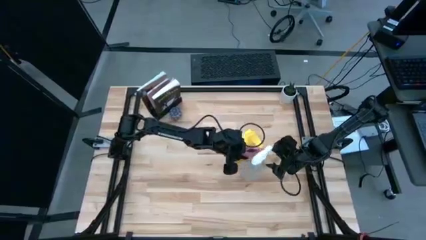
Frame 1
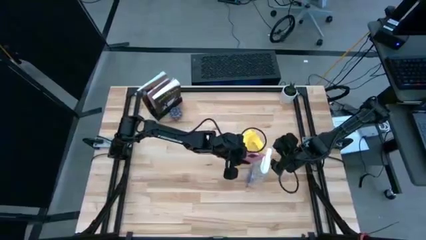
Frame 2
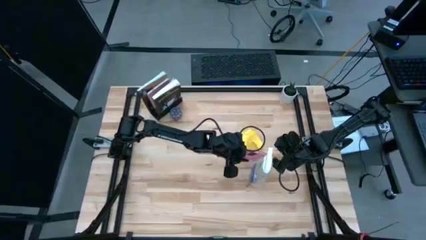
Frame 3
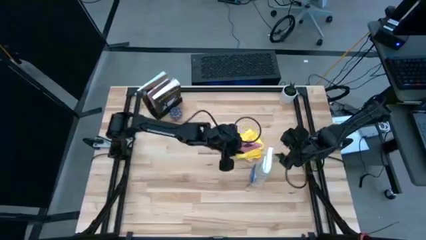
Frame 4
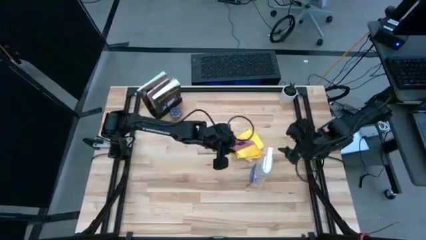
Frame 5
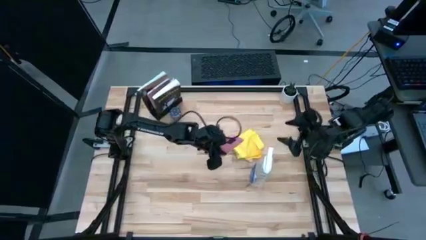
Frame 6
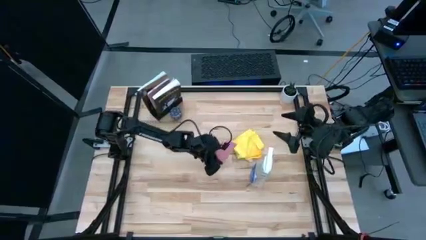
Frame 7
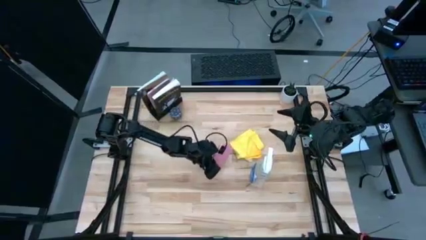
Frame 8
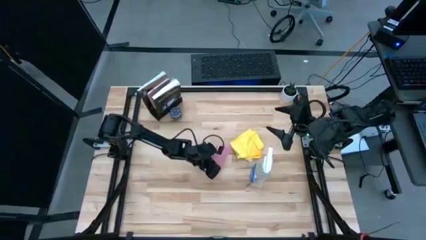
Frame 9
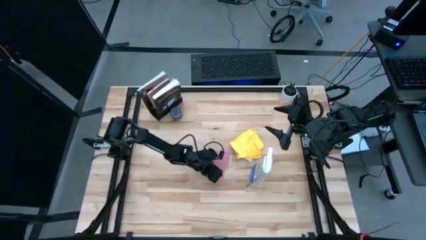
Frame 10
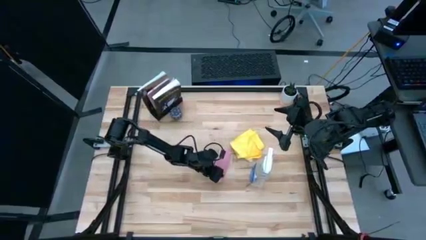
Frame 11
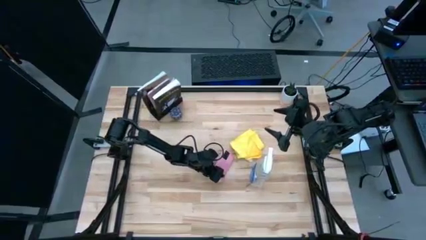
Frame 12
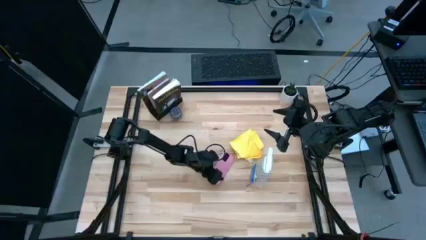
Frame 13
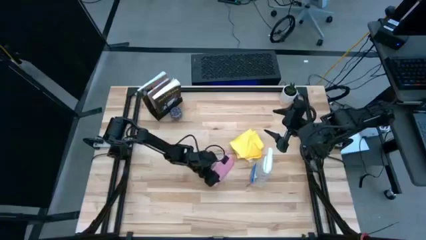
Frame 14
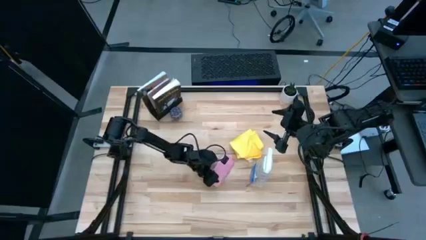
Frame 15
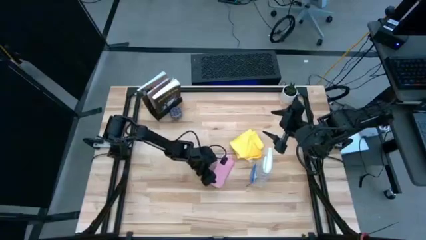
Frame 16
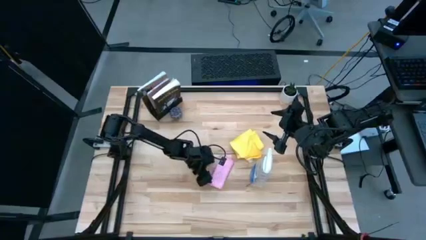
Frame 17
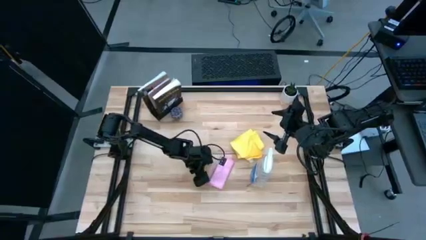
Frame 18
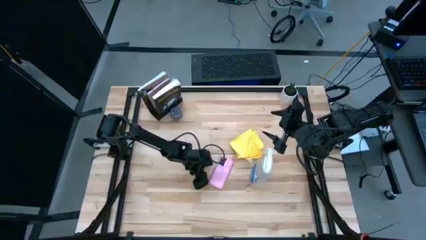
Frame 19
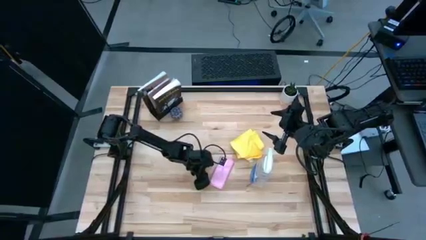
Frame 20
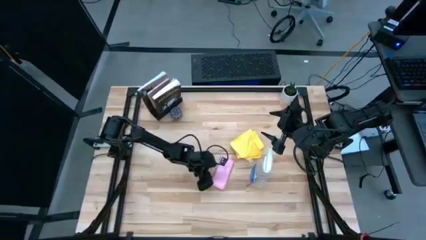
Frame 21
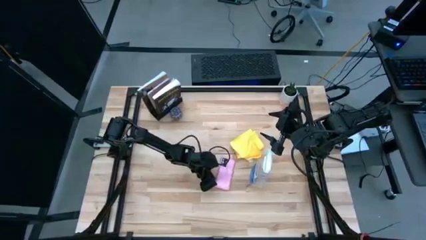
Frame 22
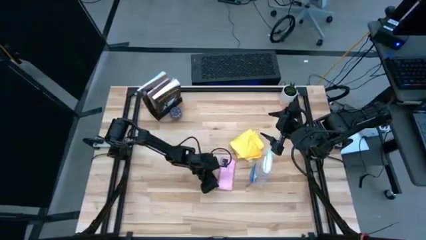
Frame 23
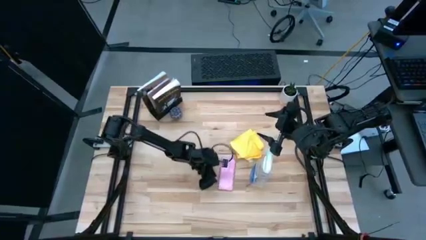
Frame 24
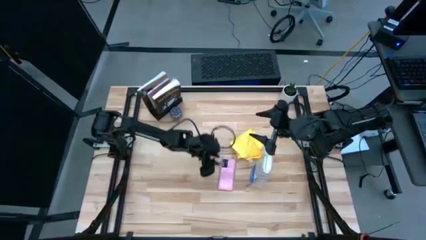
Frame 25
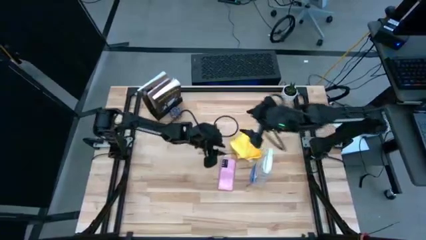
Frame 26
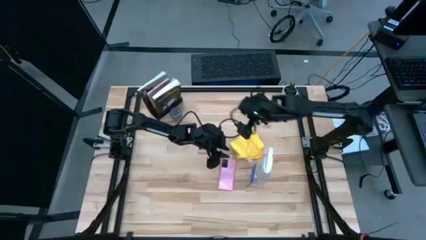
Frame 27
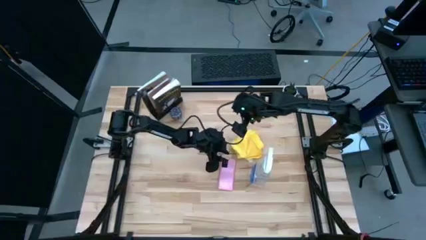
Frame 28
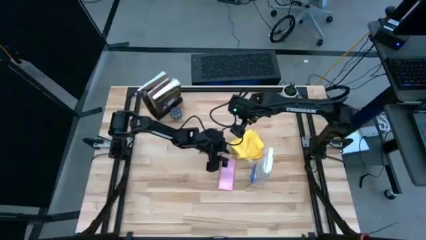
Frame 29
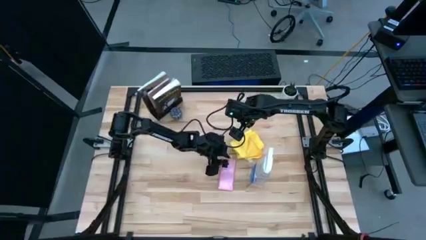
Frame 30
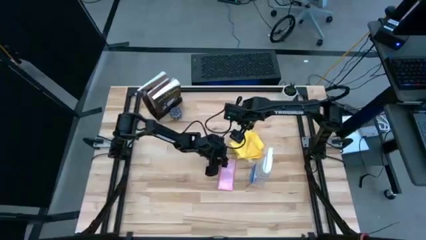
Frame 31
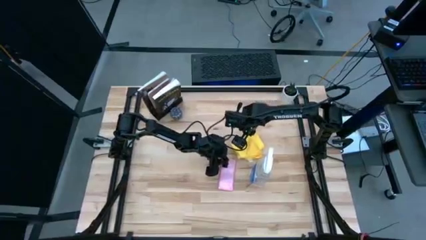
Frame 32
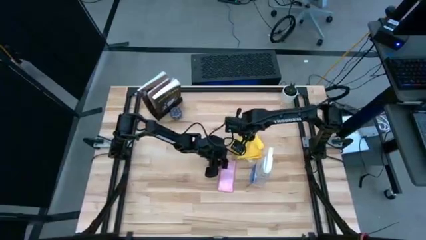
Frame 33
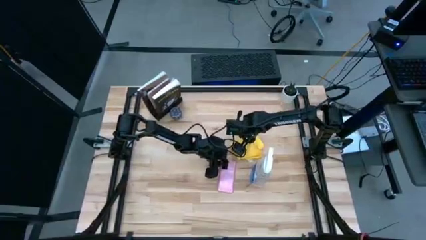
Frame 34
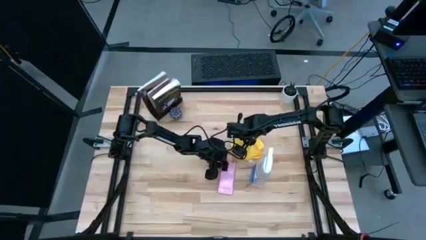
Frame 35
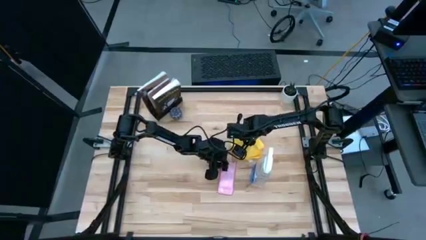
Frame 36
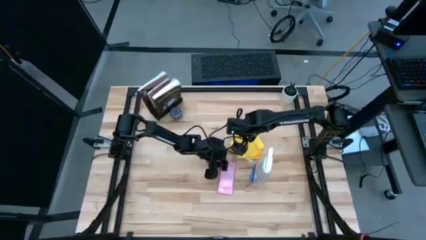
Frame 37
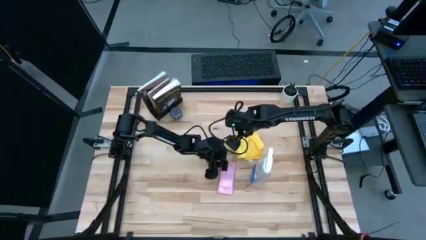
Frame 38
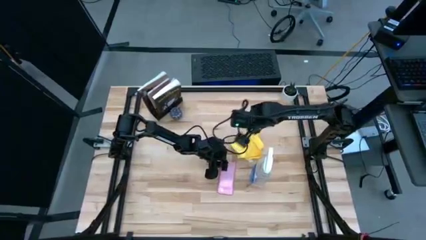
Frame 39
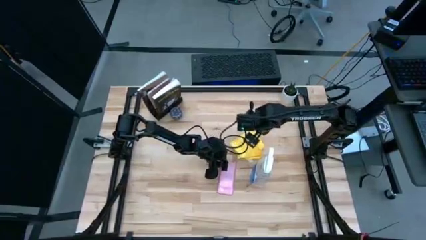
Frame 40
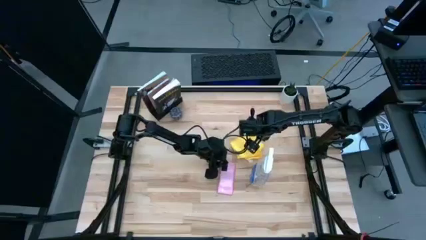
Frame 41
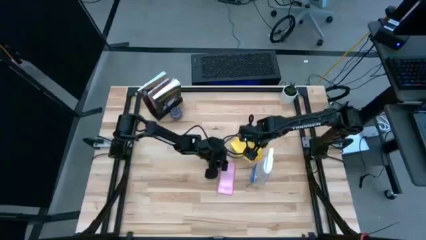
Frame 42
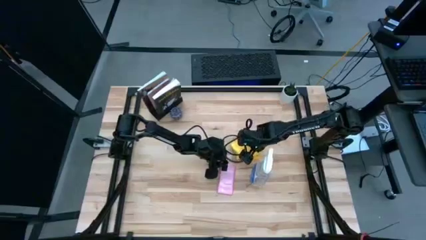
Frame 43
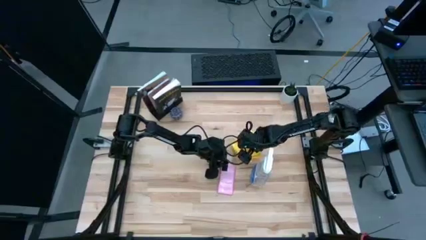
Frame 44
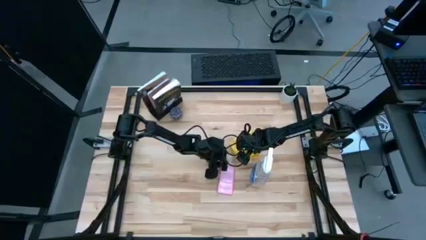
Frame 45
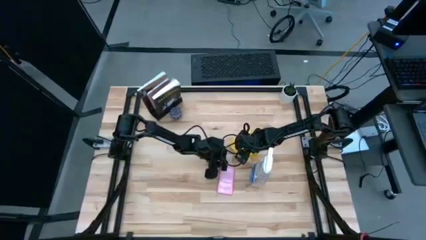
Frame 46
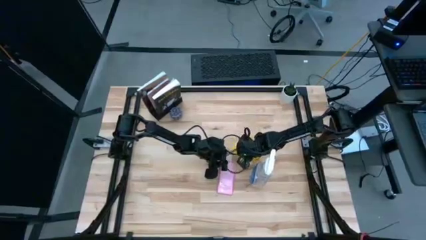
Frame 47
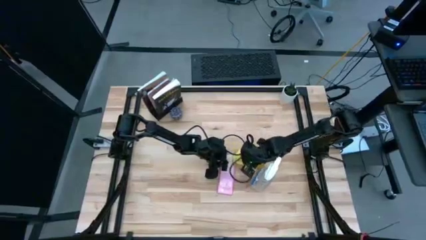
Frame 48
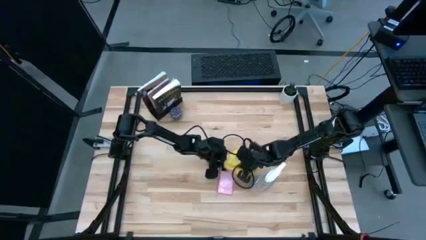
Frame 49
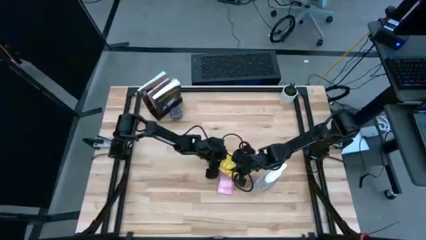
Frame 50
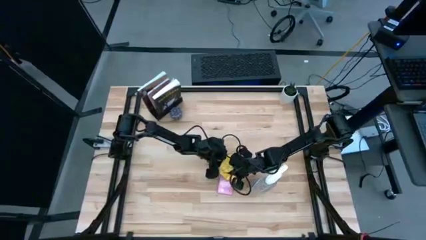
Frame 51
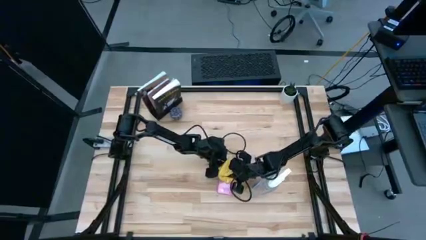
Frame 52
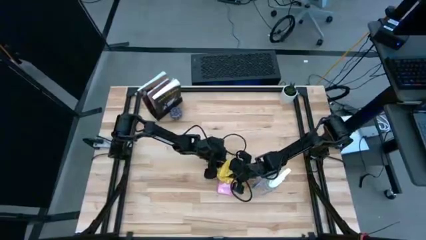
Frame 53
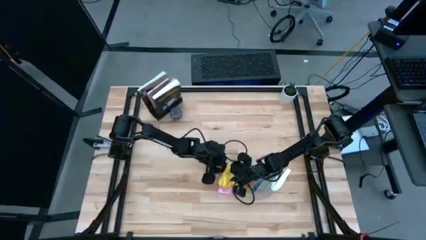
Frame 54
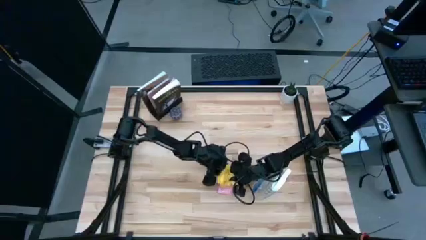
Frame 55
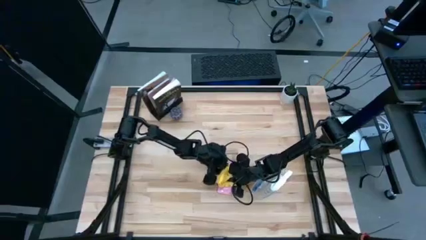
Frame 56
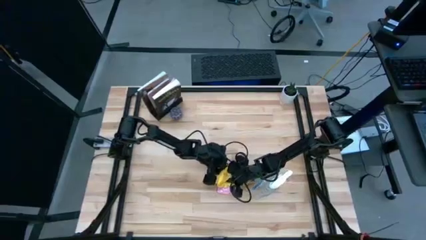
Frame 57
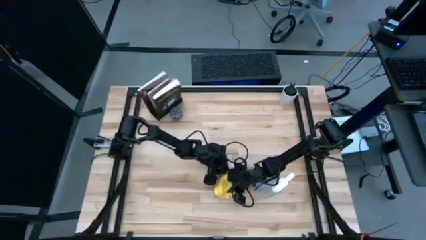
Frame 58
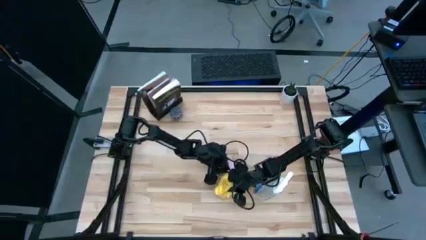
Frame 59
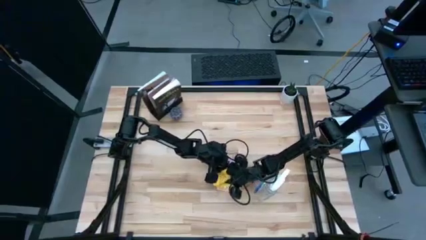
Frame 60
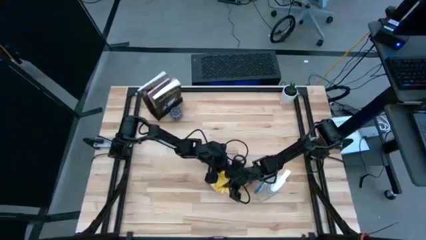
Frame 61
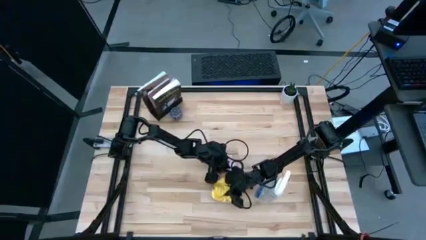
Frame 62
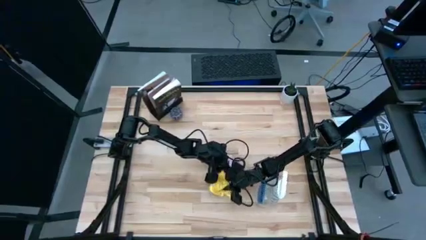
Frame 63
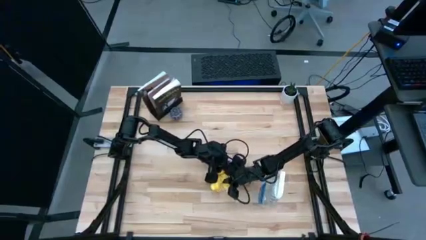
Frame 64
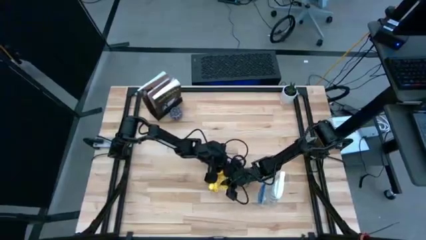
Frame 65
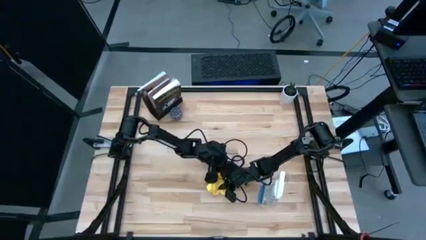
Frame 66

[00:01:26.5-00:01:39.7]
Task: Apply microfiber cloth
Wipe the back of the pink cellphone with a yellow microfiber cloth

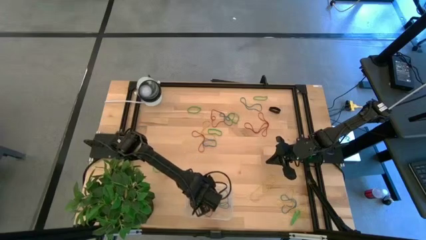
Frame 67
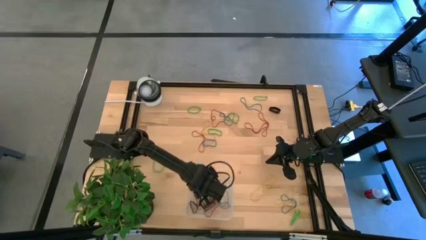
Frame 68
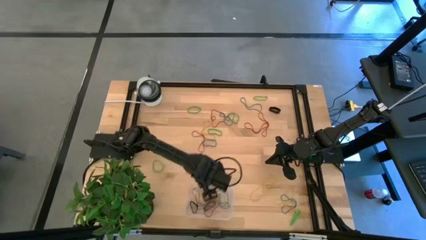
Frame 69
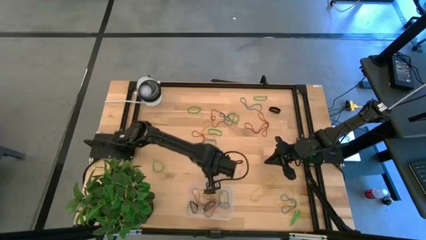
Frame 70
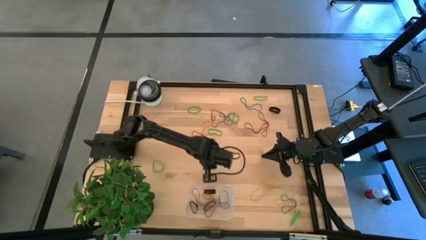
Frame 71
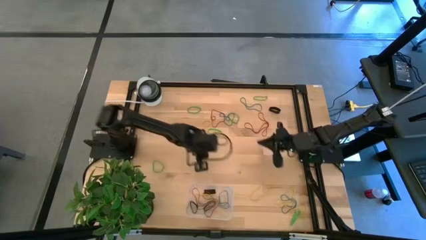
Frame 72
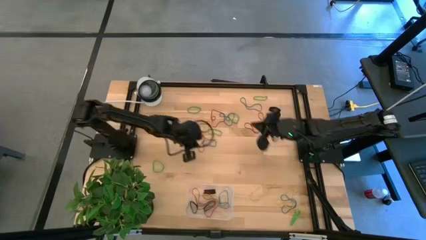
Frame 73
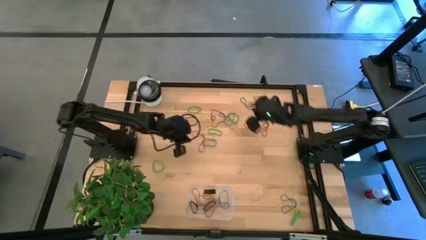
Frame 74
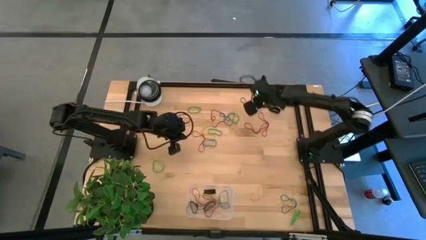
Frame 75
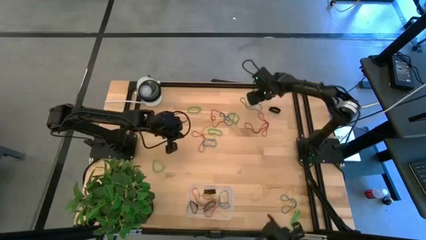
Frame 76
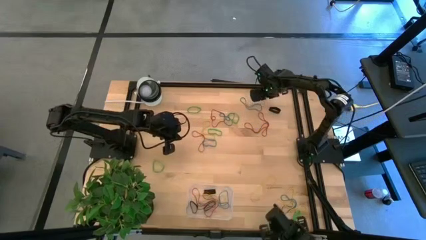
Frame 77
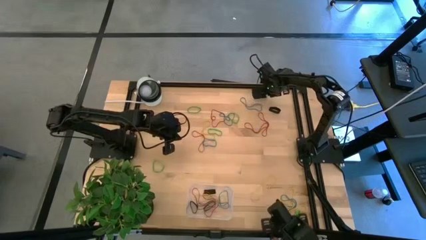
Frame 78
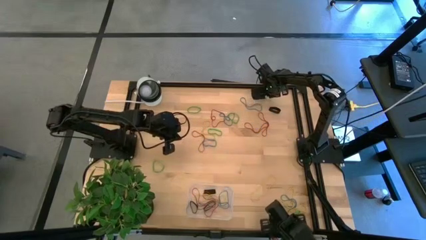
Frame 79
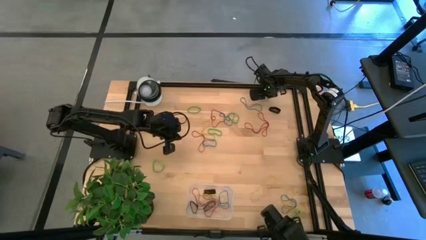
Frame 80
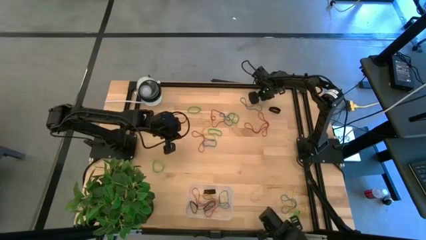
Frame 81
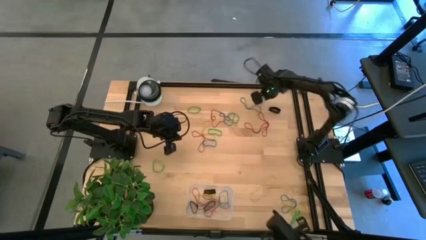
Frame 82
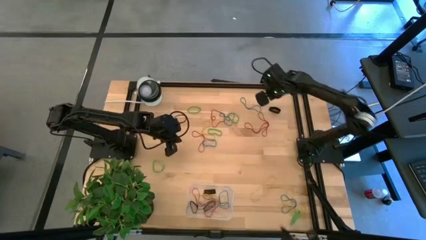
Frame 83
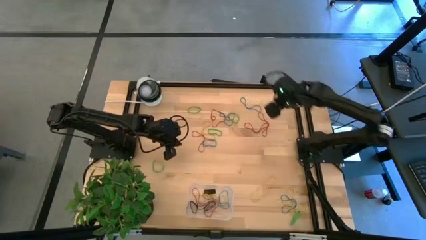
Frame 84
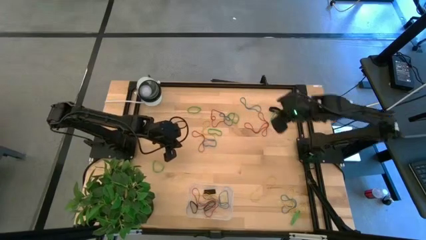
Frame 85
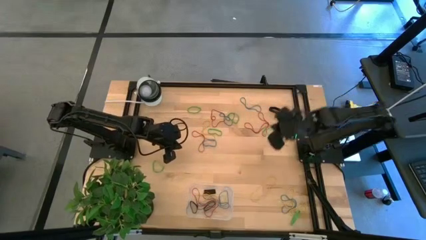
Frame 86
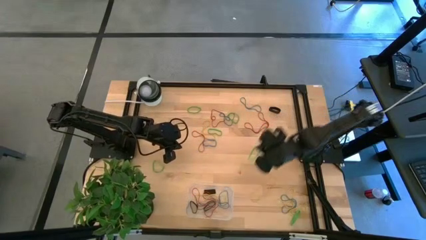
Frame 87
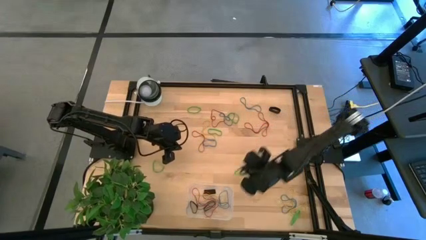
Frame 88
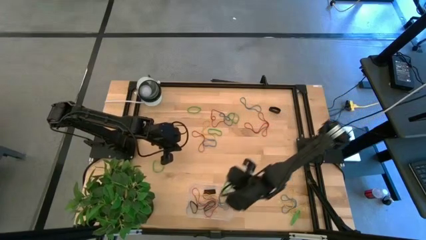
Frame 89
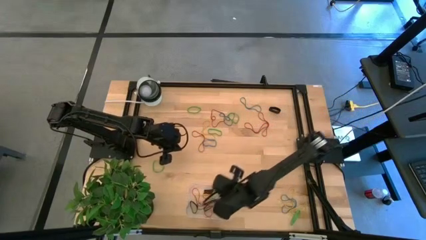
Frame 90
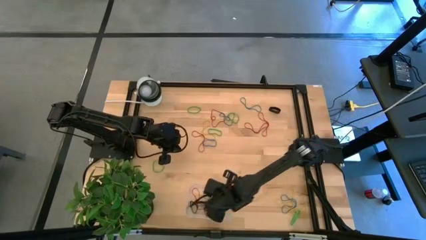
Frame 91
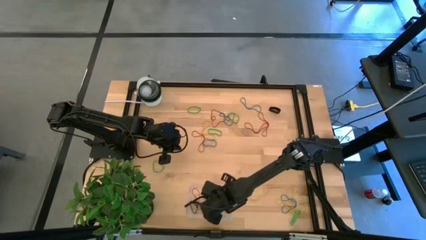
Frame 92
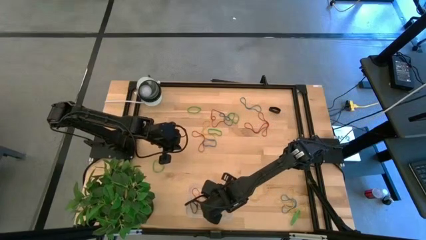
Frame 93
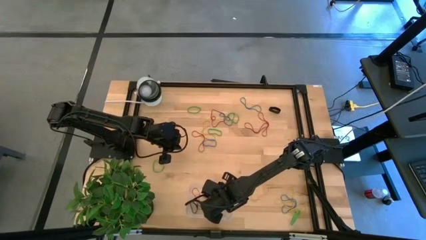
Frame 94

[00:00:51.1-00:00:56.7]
Task: Pick and place rubber bands into bin
Put the green rubber band into the transparent bin
